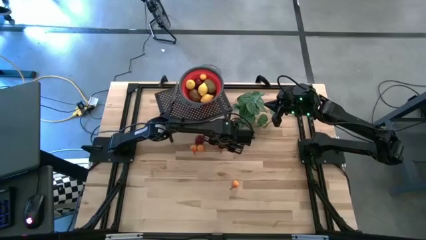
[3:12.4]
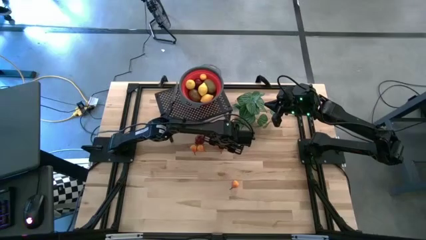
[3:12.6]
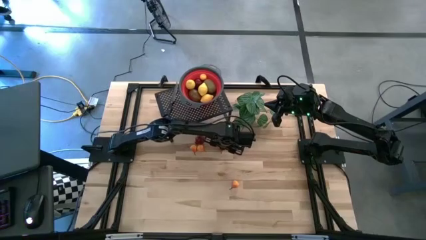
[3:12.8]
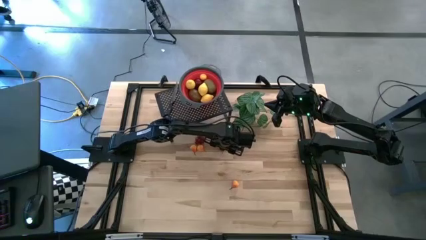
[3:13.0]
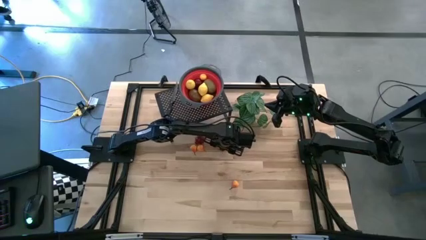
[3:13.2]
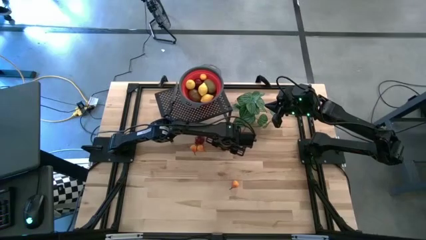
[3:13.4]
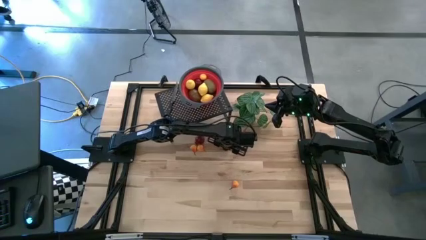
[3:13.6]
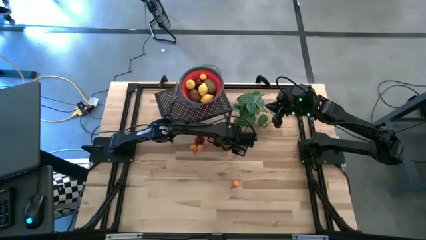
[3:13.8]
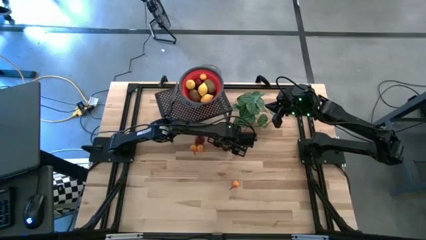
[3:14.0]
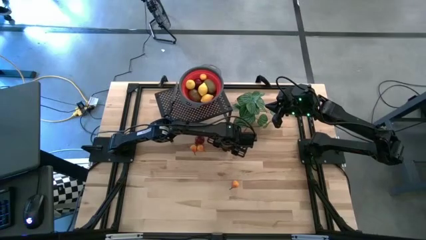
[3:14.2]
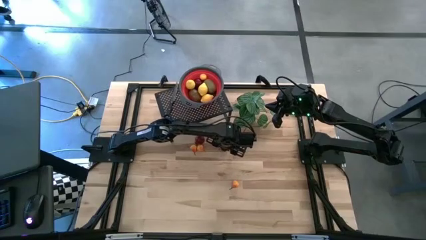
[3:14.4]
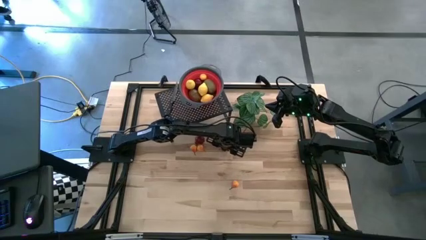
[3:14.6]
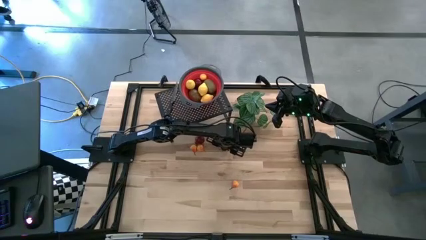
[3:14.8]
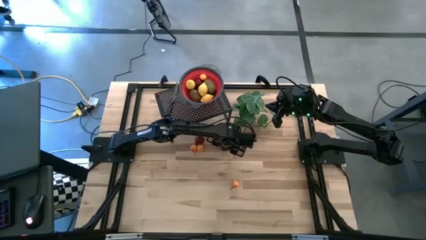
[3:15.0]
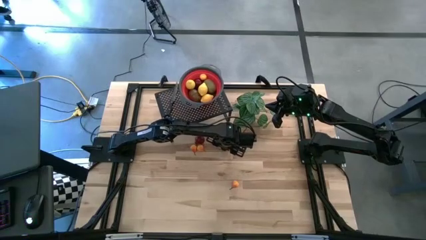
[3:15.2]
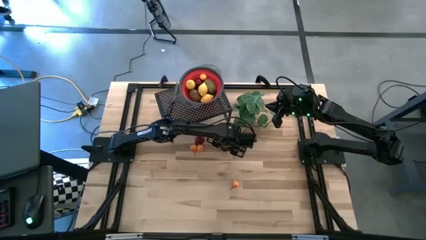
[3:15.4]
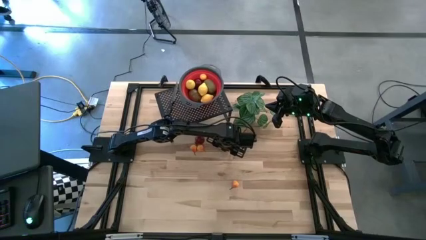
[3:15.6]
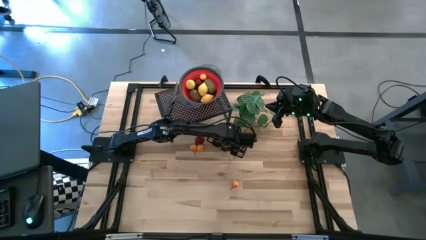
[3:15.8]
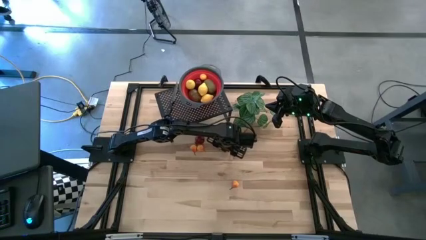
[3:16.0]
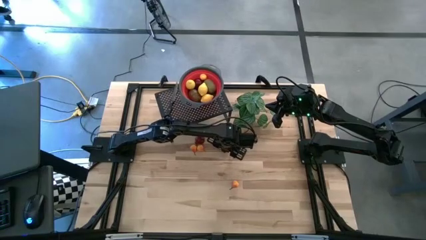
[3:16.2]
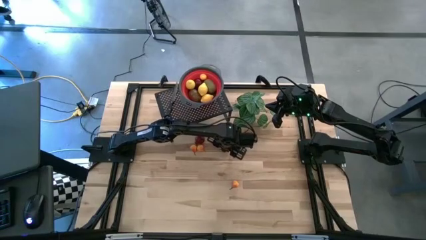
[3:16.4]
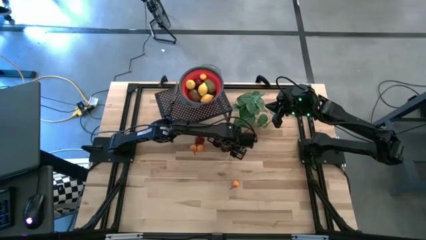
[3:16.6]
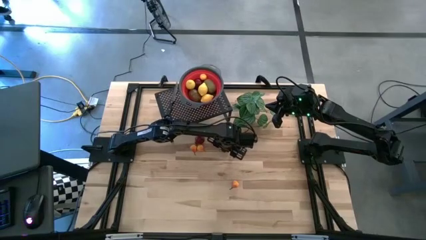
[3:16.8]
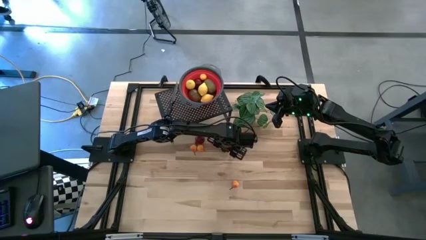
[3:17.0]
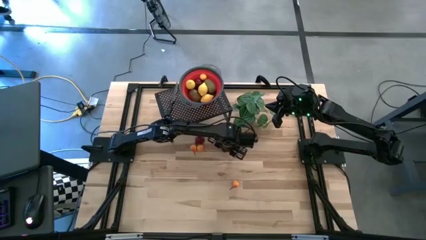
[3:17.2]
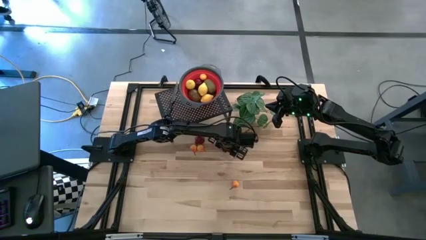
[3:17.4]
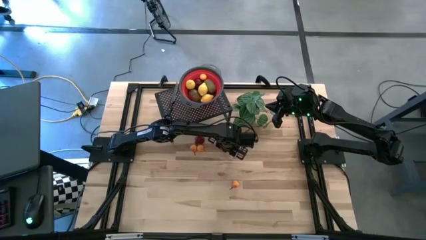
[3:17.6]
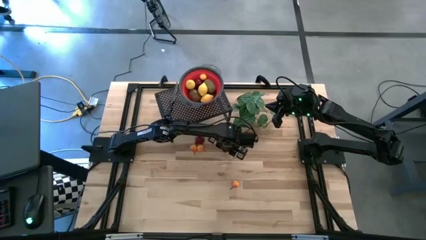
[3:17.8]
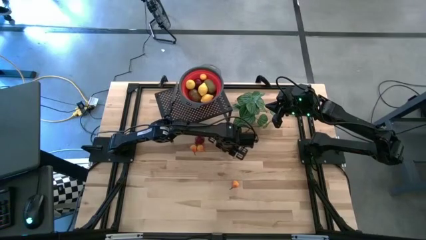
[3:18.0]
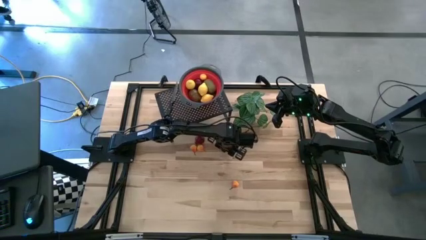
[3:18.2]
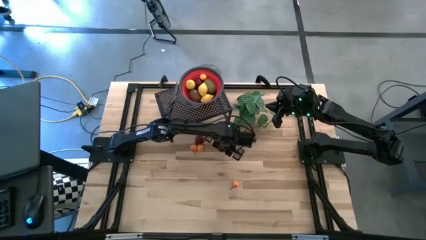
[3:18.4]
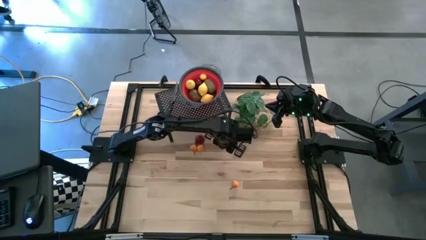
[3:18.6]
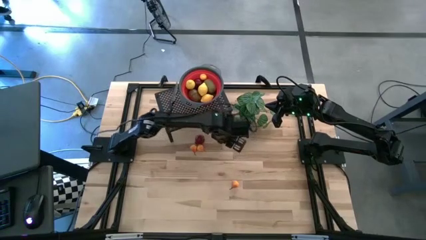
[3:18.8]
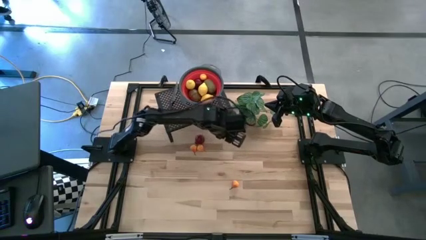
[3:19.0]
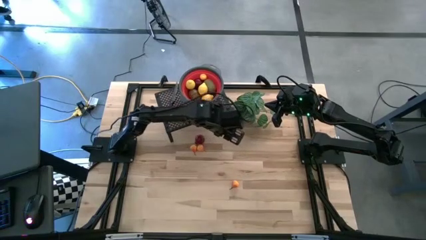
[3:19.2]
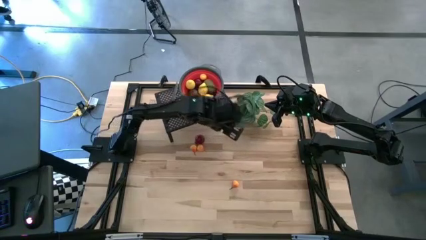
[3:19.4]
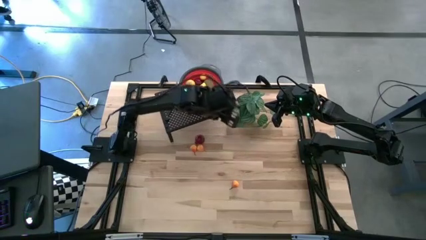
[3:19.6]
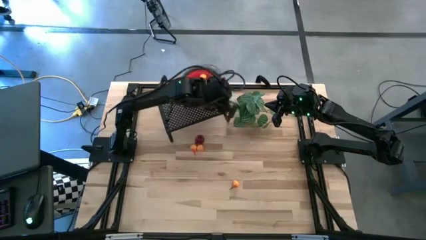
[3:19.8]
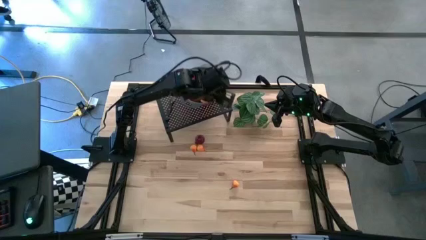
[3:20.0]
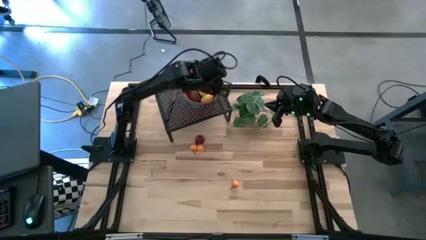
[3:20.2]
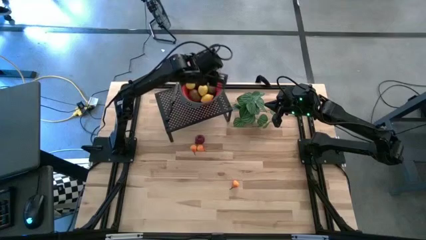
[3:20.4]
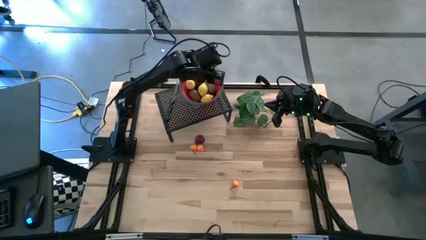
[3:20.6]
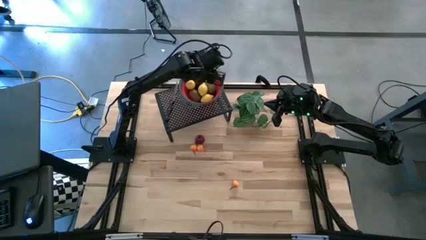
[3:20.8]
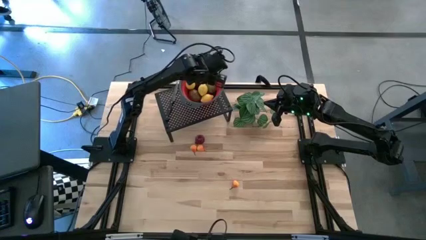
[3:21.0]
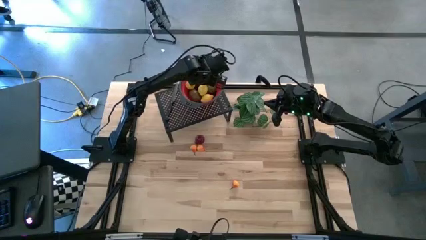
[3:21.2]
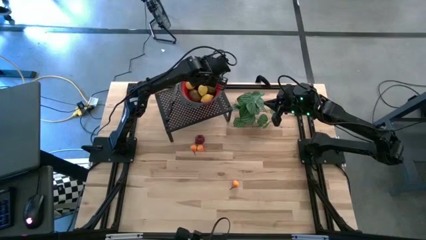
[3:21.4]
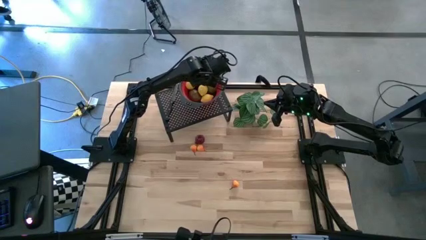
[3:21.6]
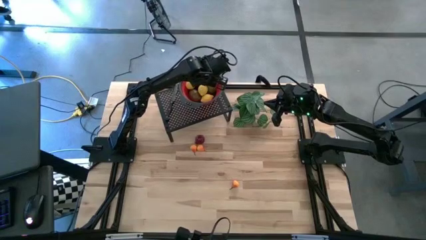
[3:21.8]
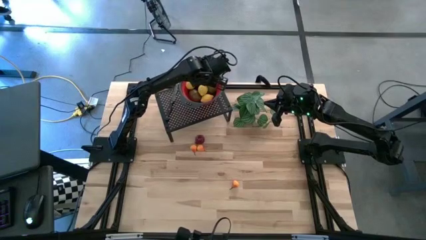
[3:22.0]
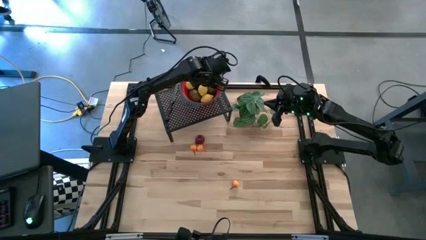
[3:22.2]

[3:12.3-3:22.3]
Task: Pick & Place Fruit
Put the orange pear into the red basket on the shelf
